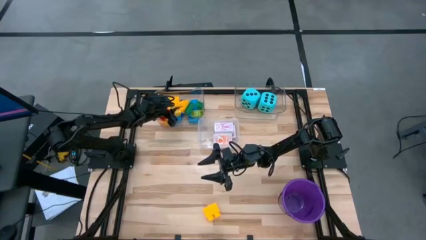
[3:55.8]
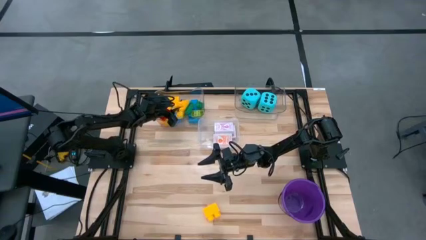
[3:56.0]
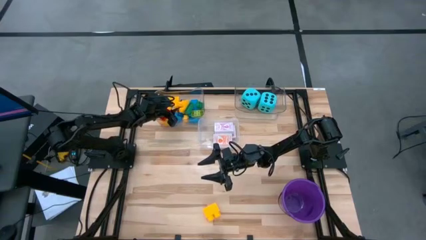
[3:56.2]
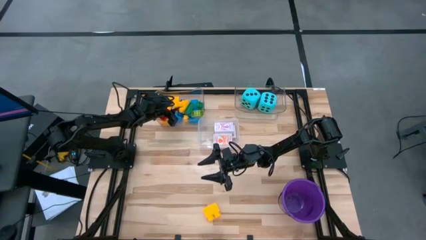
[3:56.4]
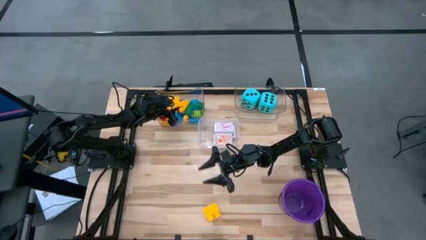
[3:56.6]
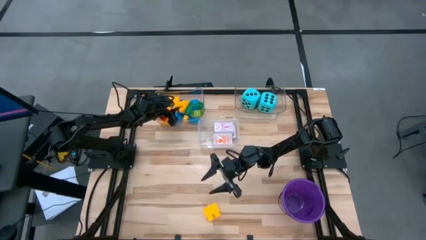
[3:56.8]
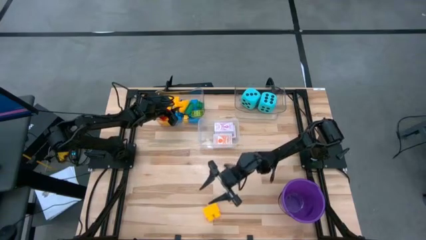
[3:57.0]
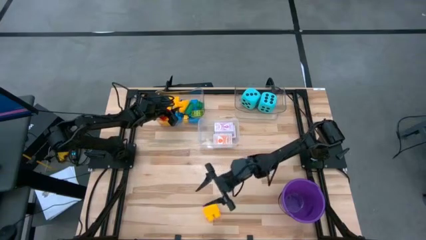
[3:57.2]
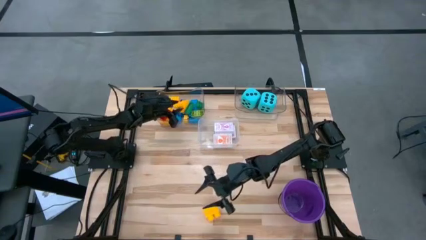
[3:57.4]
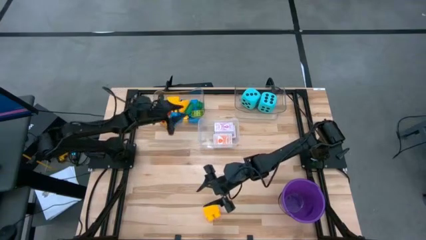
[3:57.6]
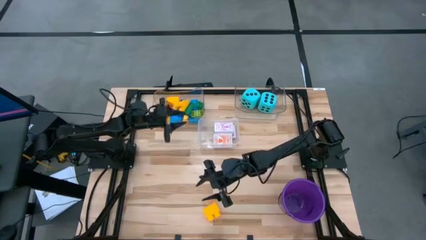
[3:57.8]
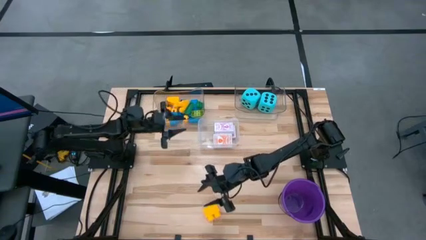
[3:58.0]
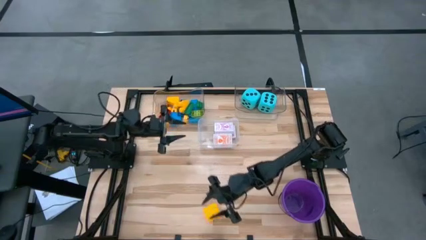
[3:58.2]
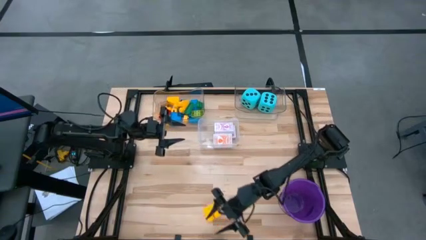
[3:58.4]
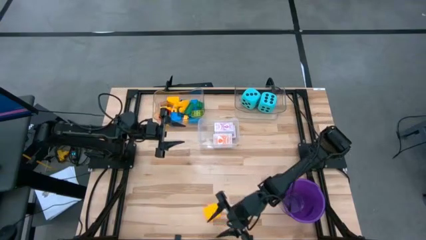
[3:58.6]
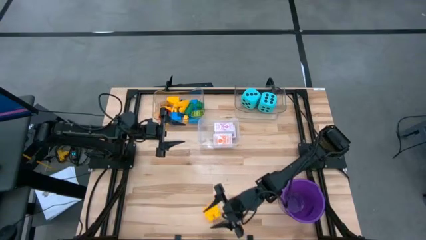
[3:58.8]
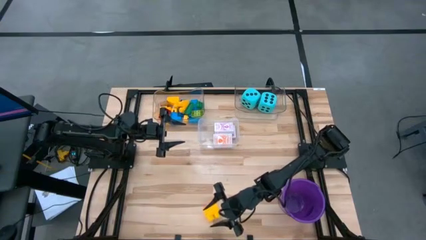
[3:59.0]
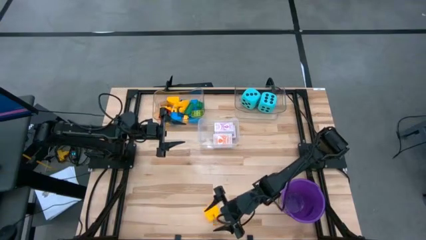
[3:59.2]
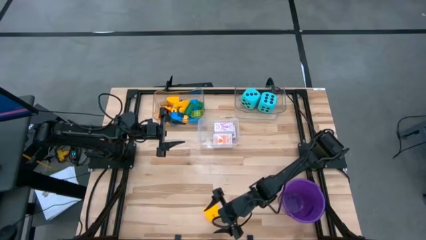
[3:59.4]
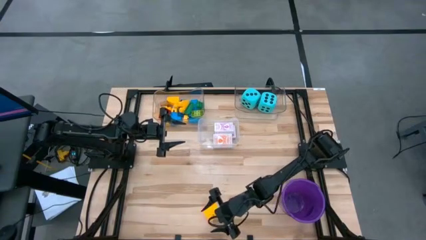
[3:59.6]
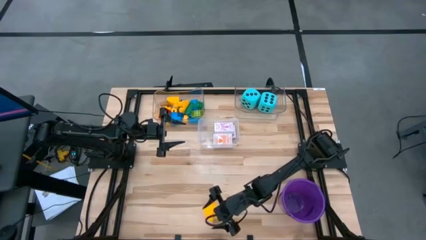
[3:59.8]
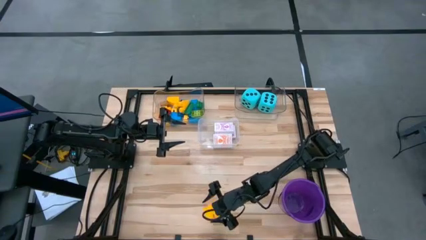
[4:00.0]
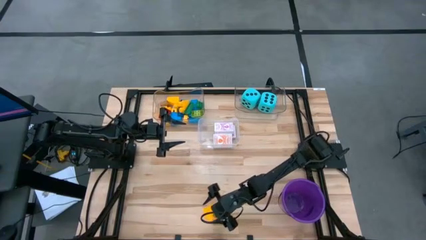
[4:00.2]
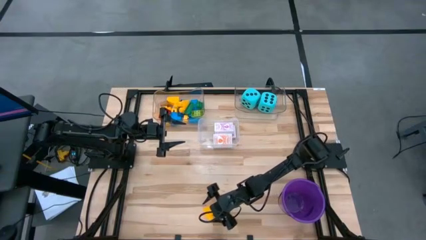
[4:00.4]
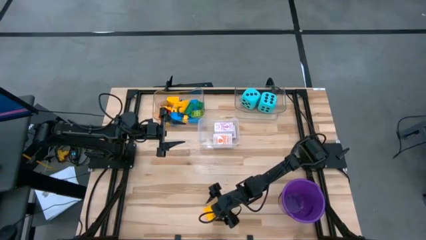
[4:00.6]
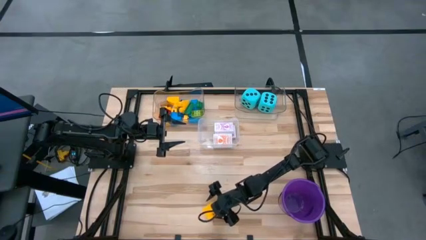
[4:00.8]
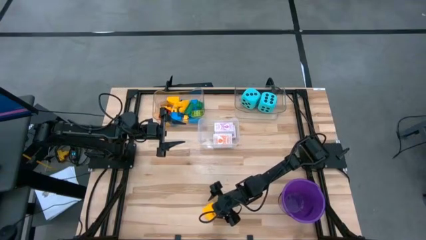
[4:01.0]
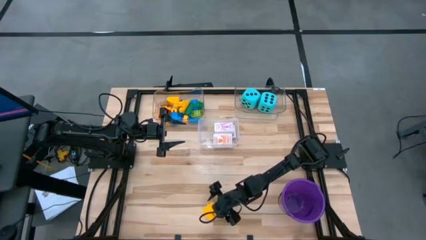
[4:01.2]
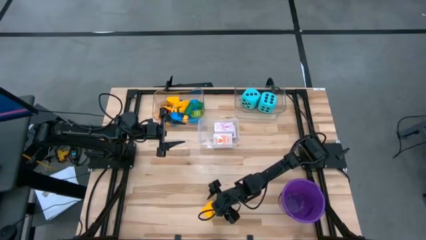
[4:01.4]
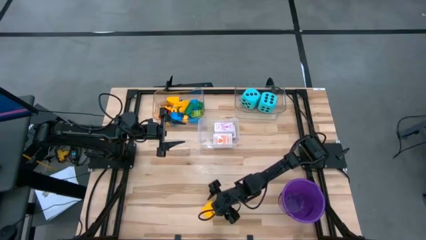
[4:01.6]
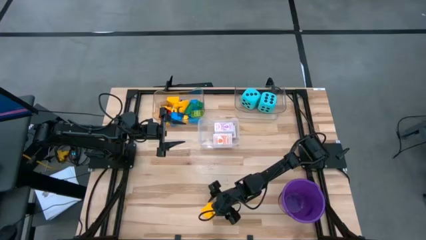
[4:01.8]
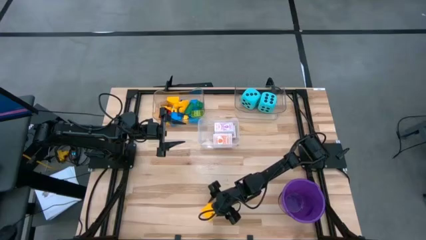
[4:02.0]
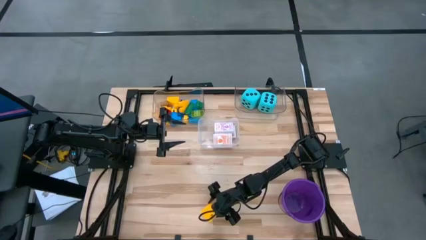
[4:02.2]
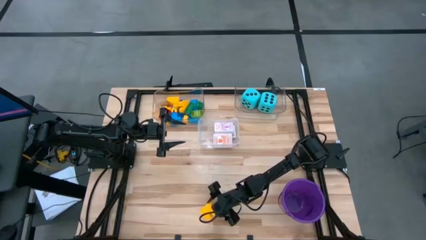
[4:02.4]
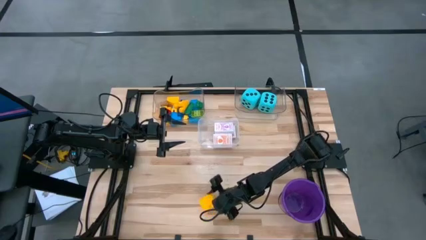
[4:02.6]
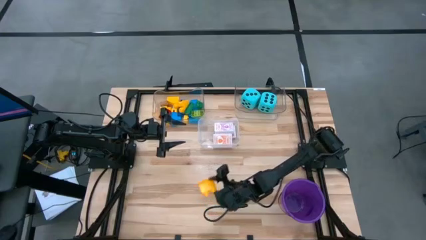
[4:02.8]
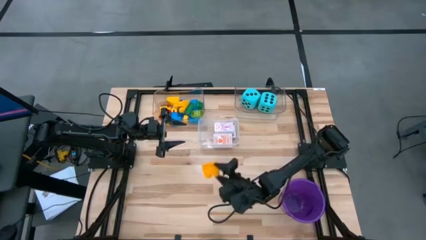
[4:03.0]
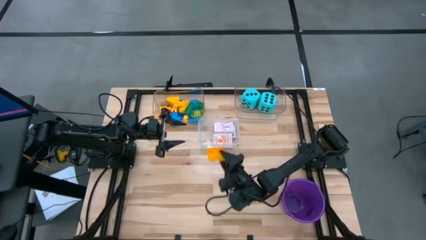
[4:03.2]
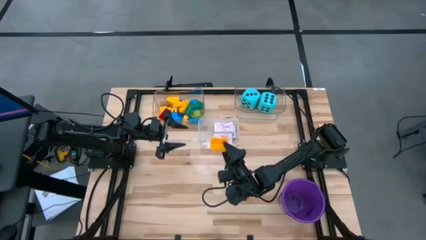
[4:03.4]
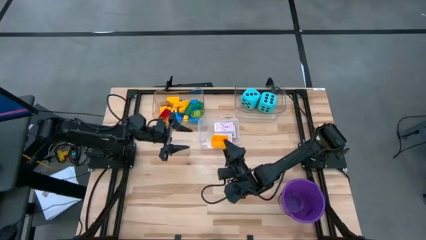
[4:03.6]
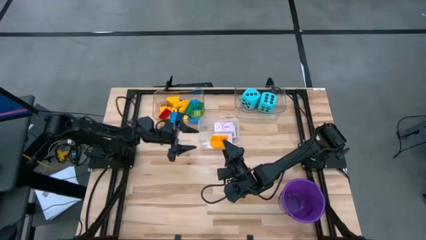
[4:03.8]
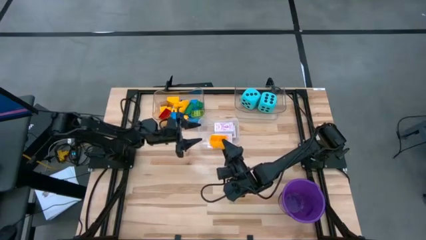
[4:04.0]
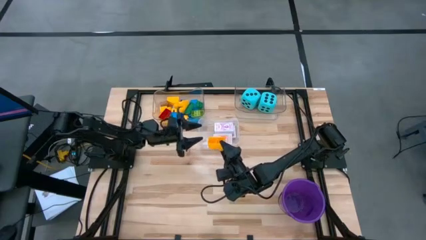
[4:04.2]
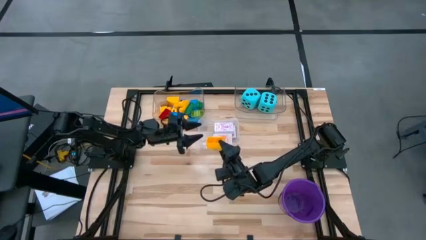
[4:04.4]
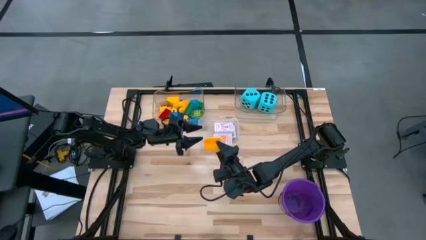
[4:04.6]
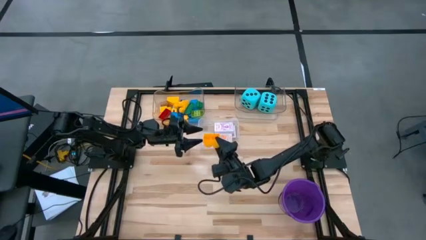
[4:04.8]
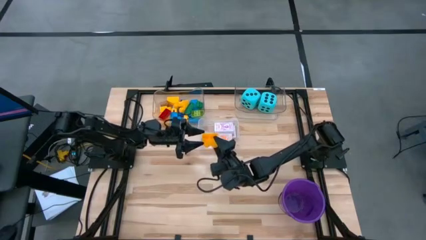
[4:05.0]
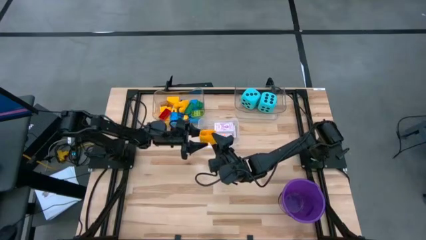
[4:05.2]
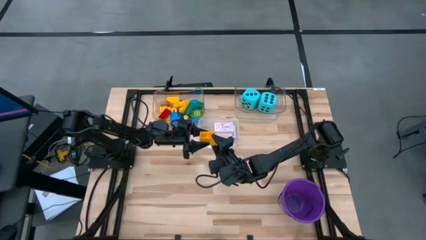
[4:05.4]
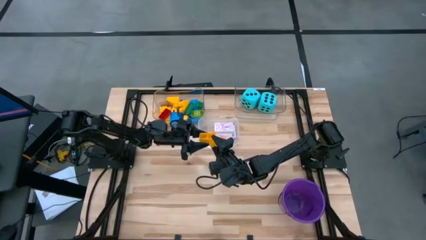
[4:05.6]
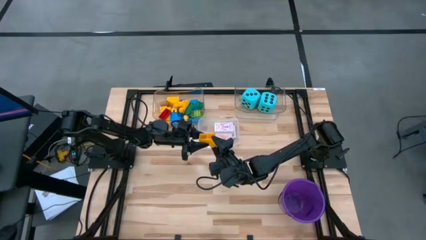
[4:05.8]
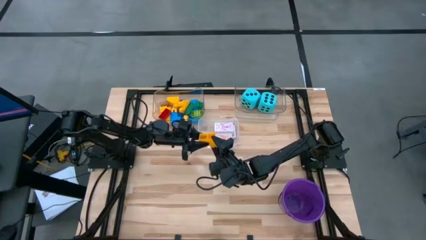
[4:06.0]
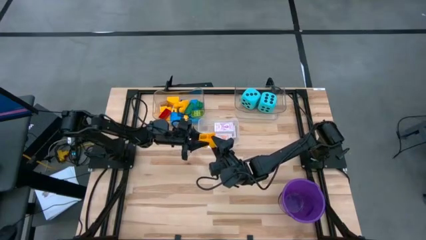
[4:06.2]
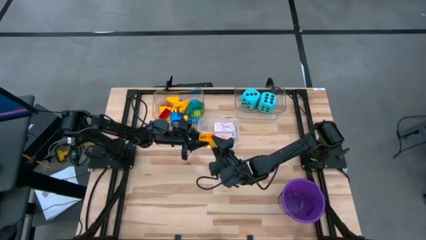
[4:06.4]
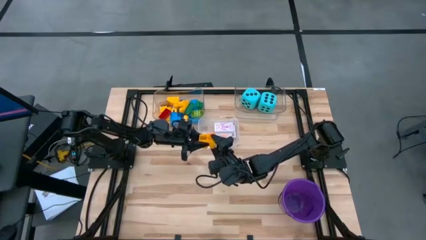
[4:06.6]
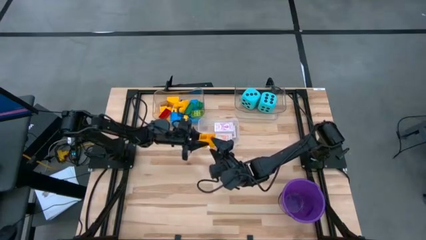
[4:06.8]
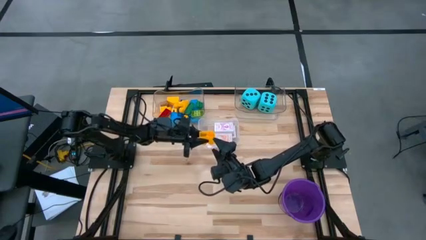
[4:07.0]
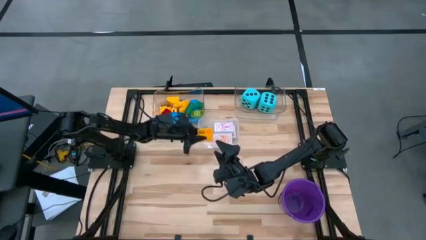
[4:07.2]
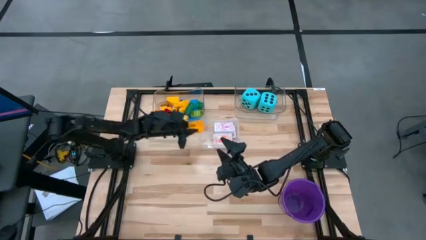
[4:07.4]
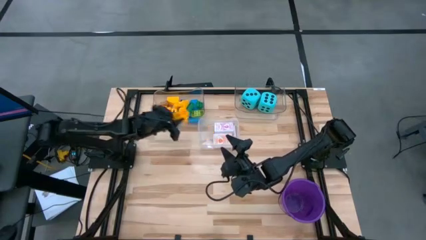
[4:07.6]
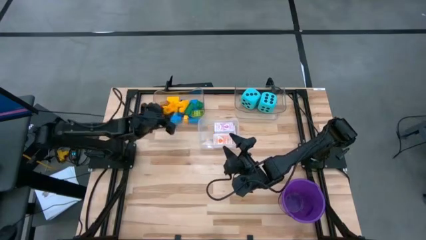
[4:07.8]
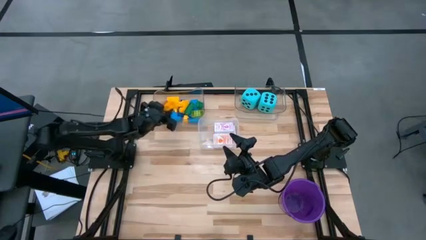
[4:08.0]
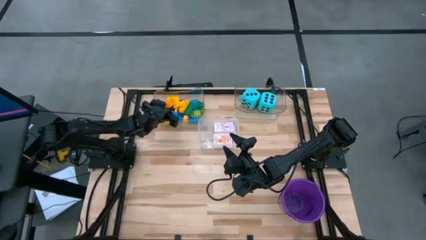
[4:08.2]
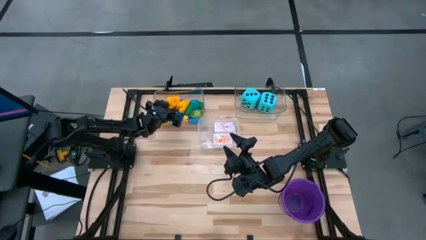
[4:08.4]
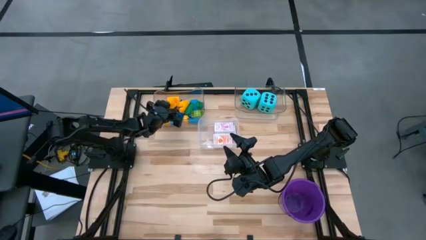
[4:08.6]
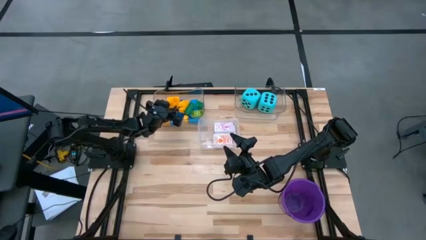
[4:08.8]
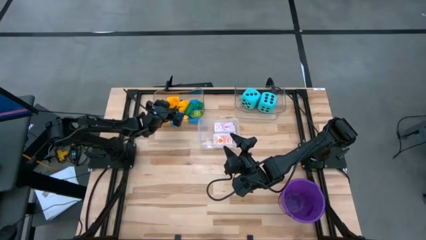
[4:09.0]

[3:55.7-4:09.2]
Task: Pick & Place Toys
Put the yellow game piece into the top left transparent bin

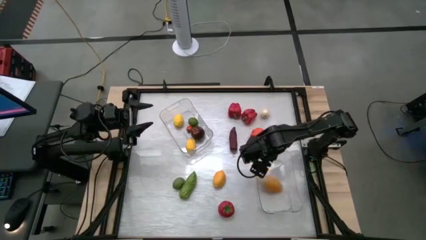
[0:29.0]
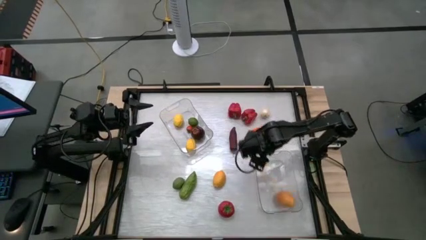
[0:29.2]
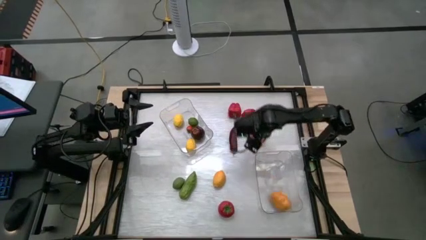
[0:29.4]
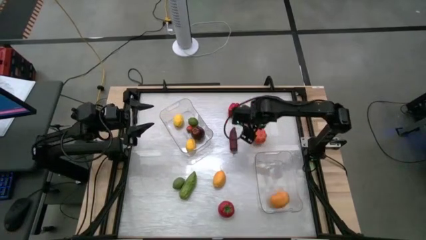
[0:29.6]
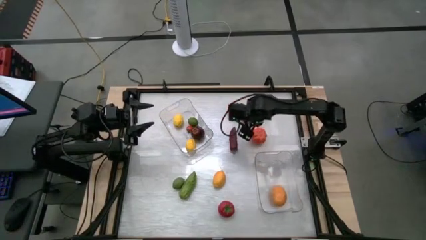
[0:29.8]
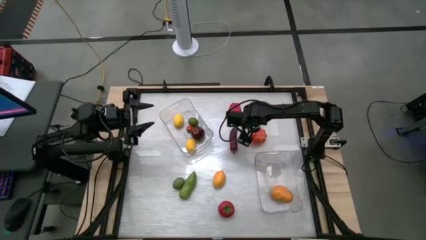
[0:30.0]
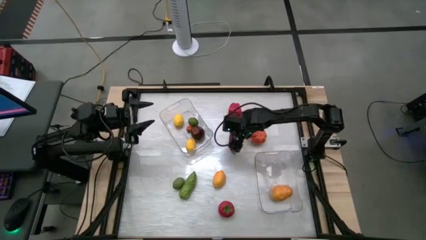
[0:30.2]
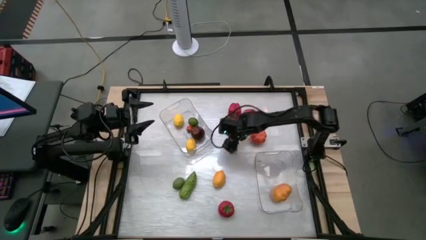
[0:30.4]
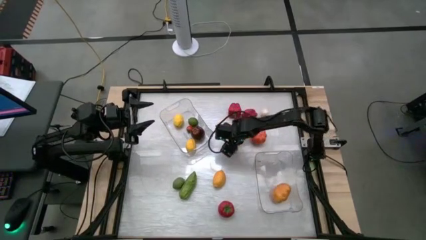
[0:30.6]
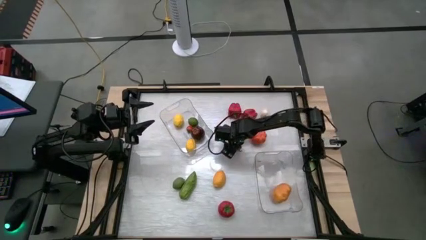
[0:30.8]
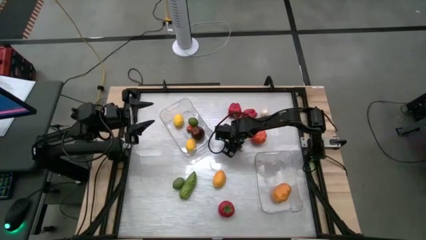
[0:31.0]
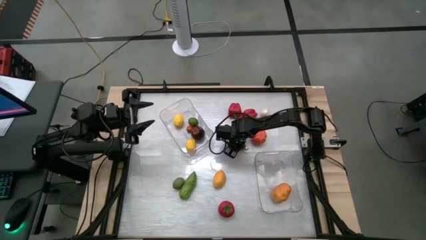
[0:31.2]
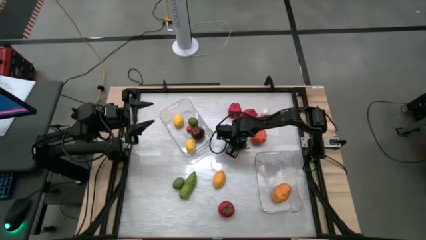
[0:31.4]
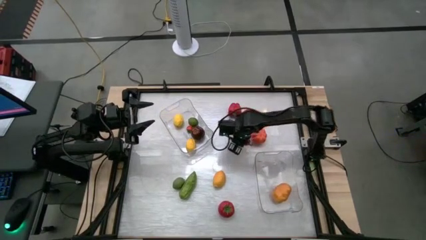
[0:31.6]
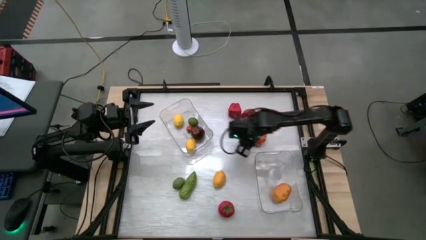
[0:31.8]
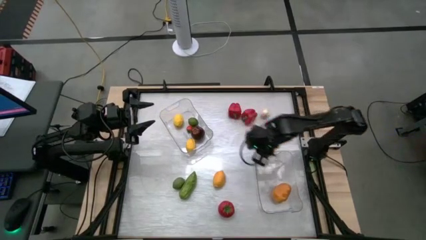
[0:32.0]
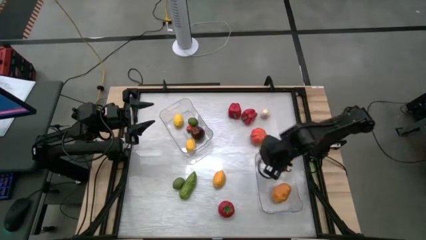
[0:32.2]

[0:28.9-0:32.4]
Task: Sort produce into baskets
Put the red chili pepper into the bottom transparent bin
